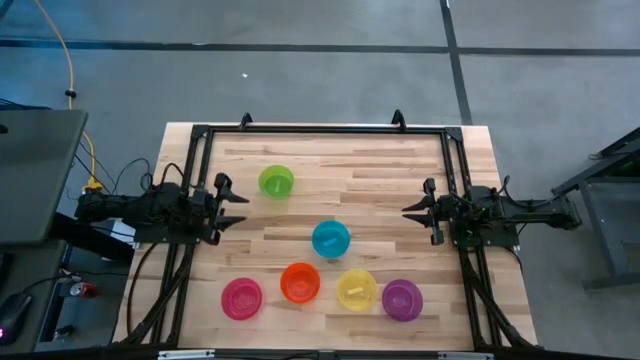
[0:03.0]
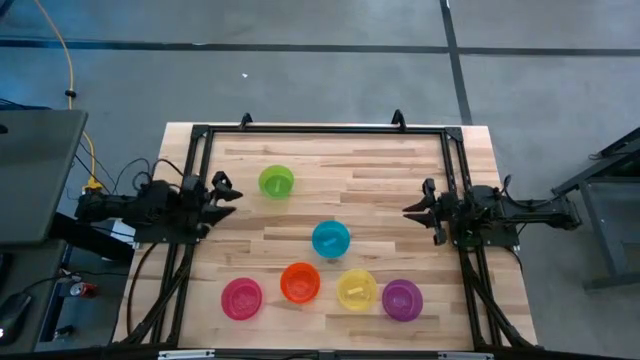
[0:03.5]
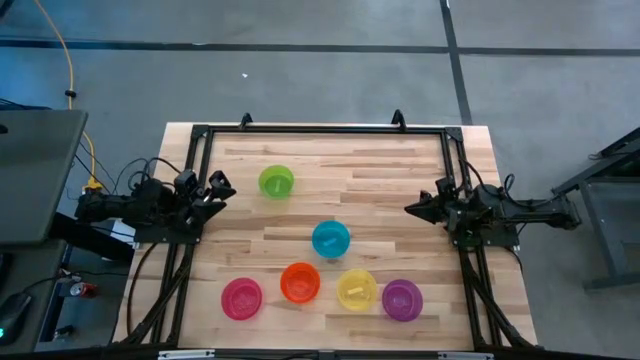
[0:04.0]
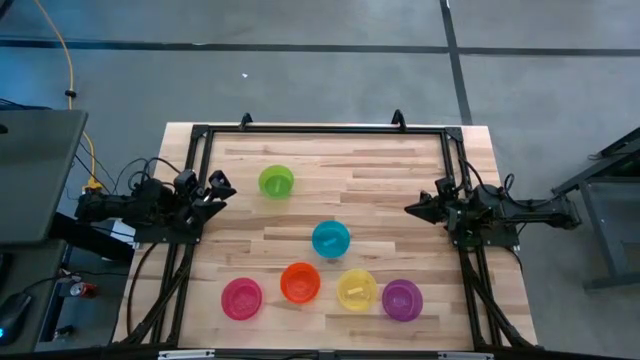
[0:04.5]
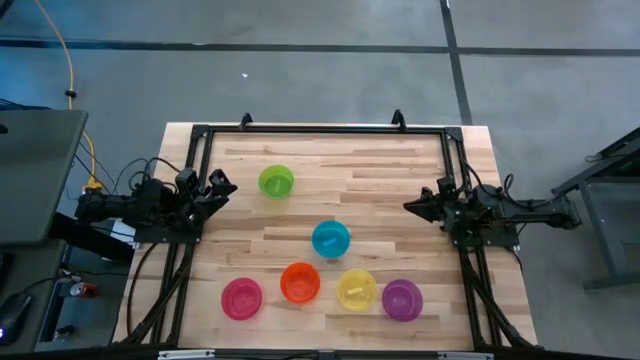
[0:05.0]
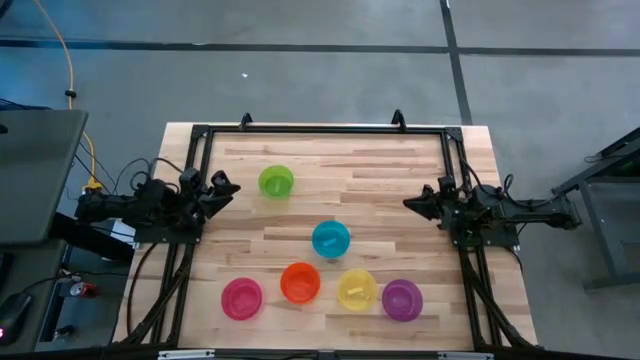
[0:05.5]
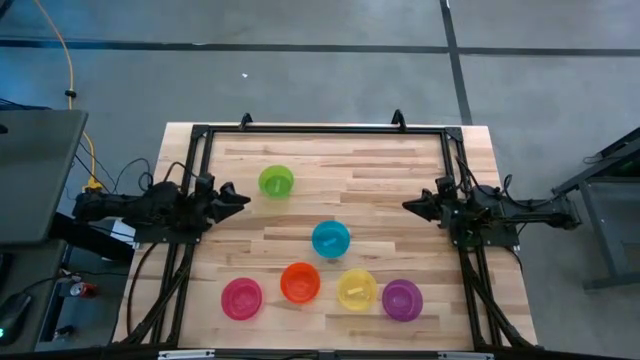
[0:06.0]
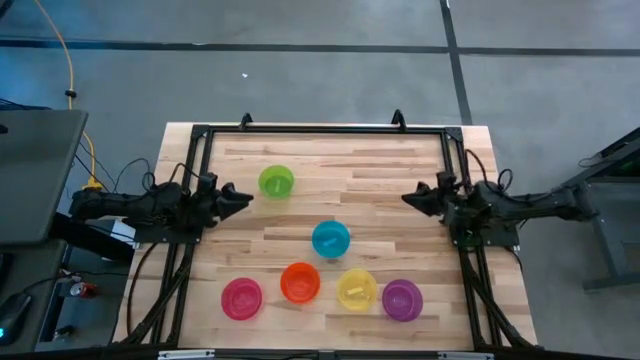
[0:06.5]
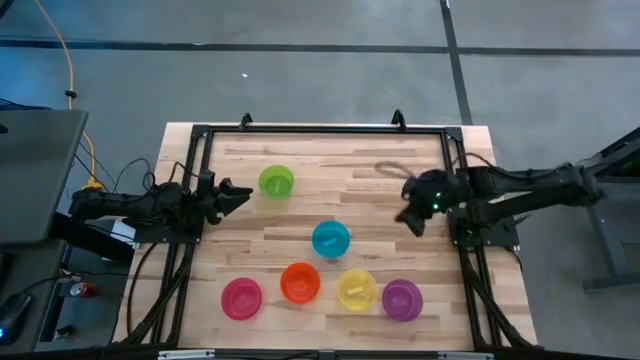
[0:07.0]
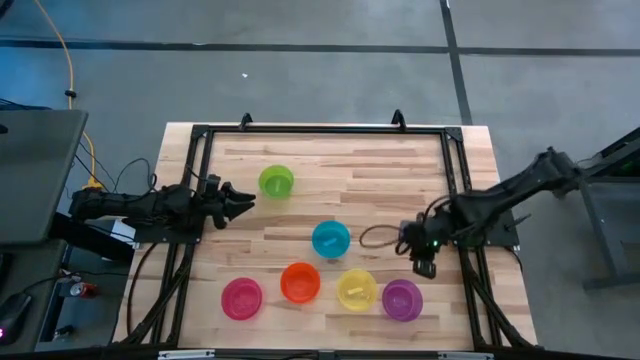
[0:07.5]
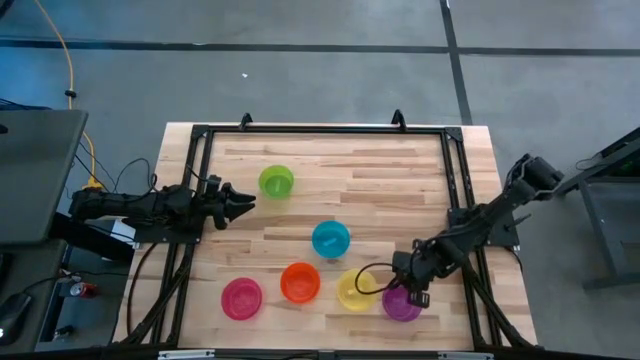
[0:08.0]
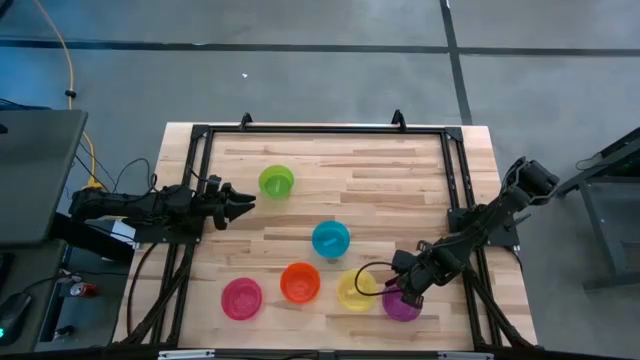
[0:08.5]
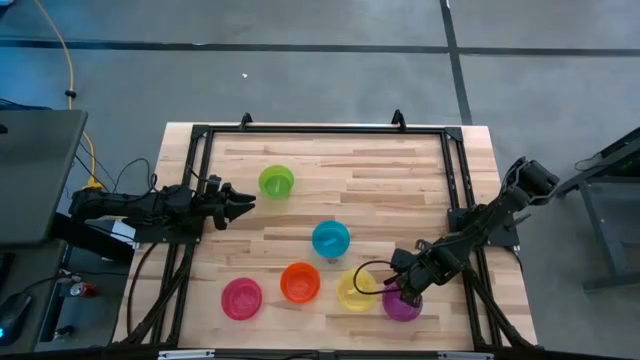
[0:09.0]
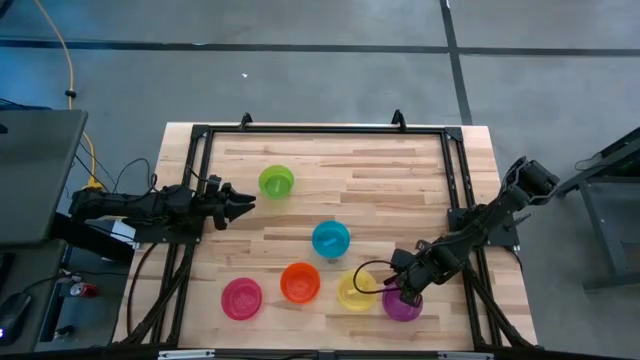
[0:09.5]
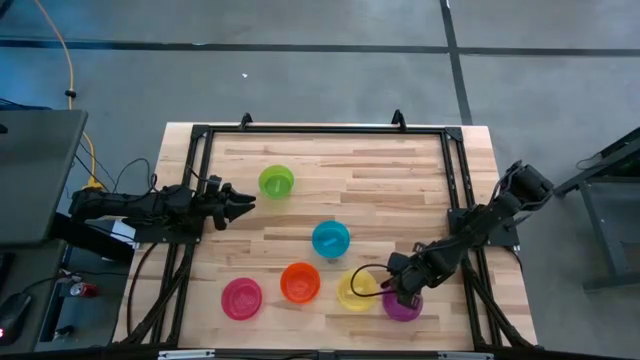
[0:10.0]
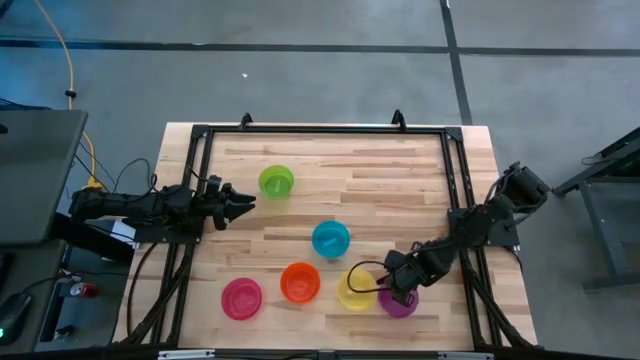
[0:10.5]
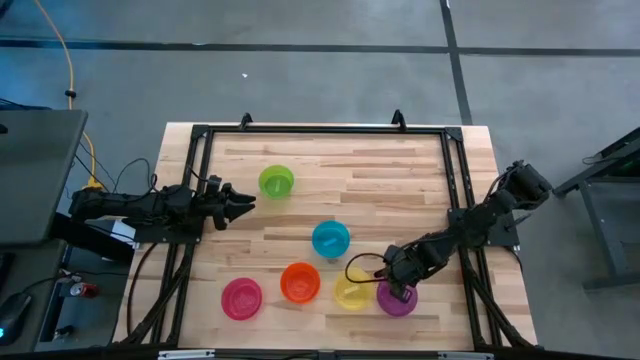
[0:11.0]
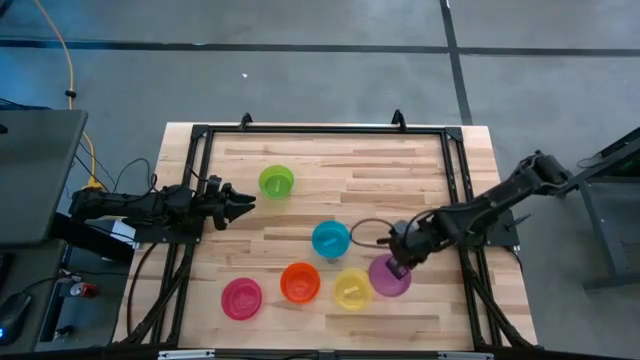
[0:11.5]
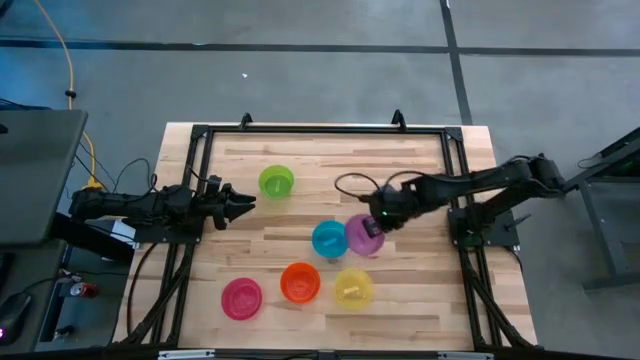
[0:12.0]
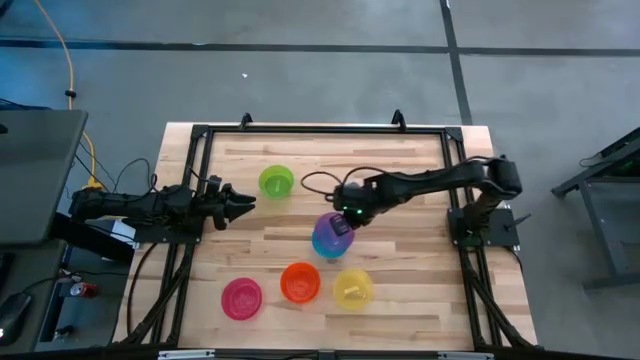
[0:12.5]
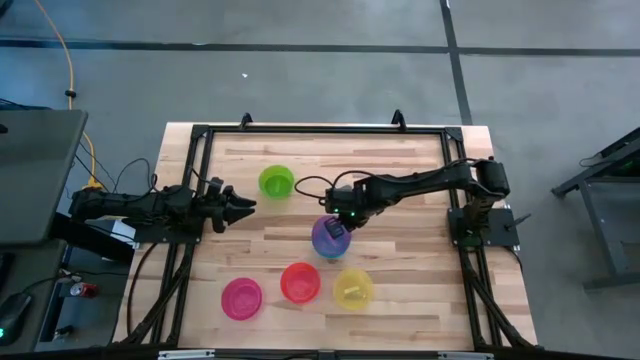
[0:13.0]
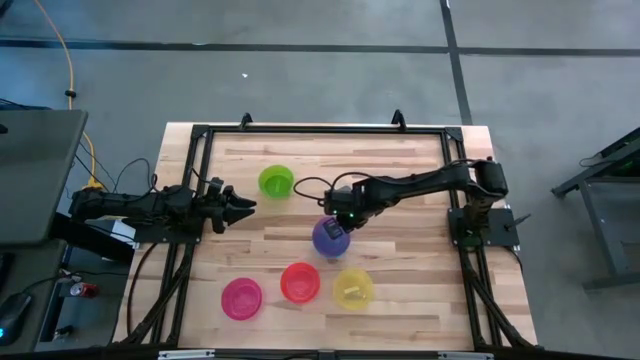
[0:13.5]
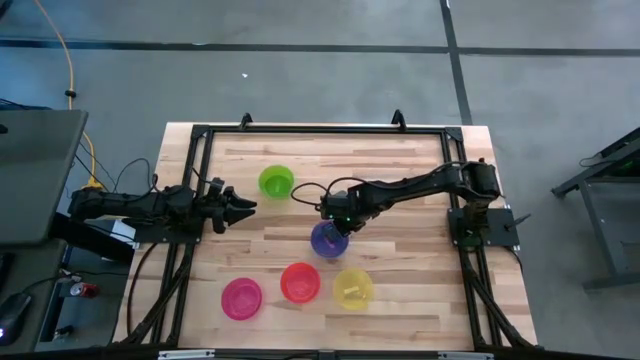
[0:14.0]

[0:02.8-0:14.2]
Task: Nest bowls inside each other
Stack the purple bowl on the blue bowl

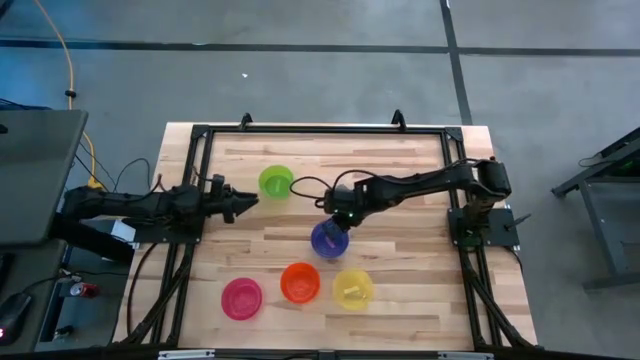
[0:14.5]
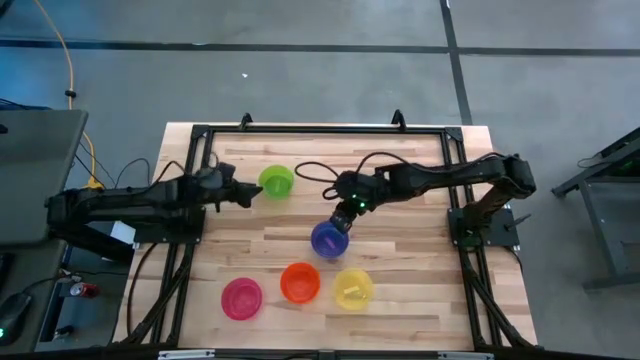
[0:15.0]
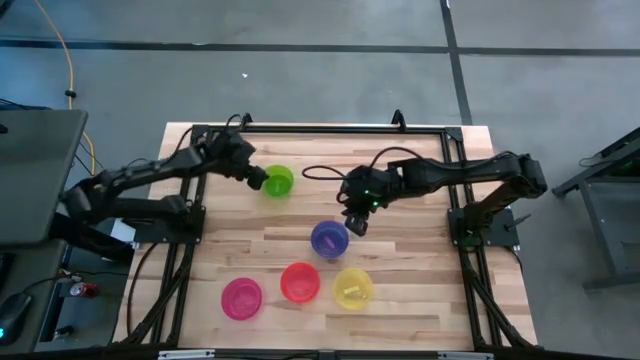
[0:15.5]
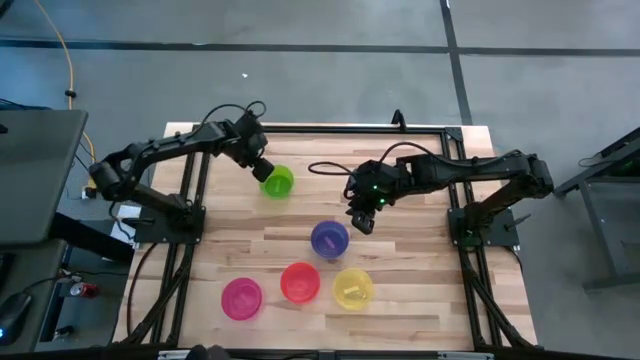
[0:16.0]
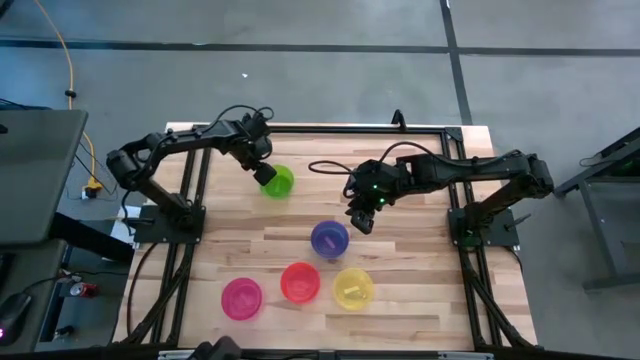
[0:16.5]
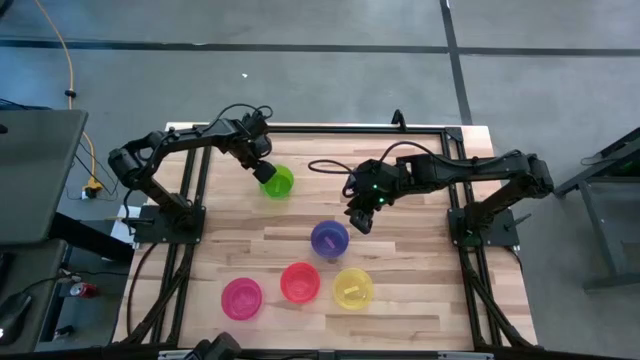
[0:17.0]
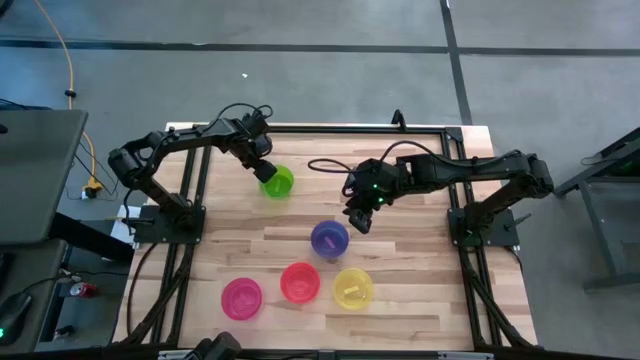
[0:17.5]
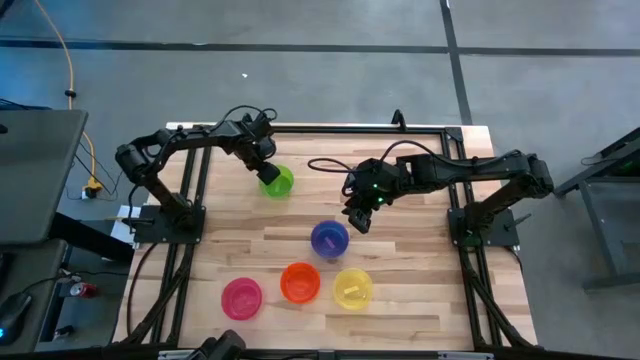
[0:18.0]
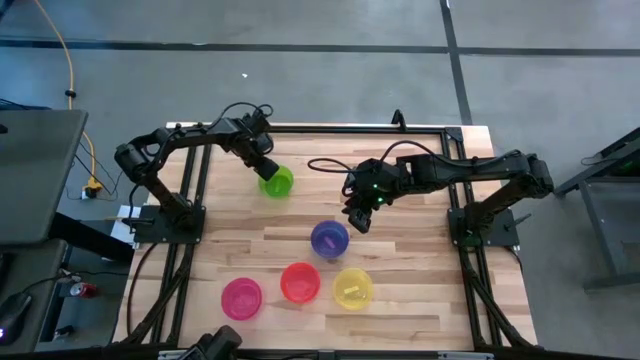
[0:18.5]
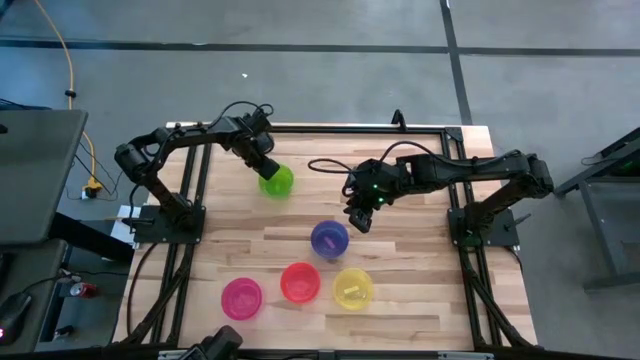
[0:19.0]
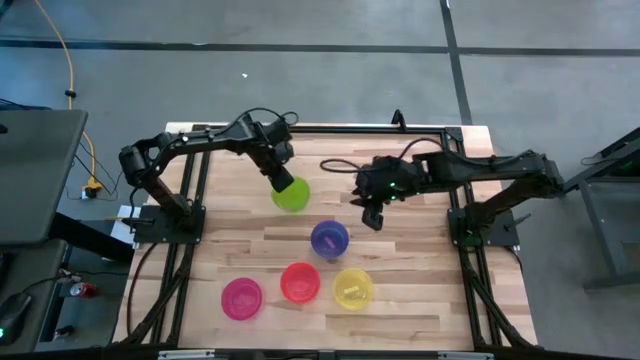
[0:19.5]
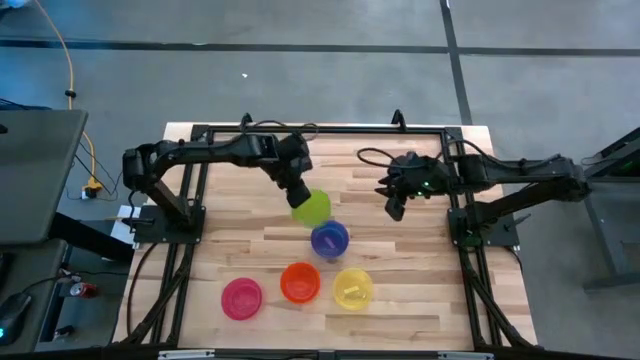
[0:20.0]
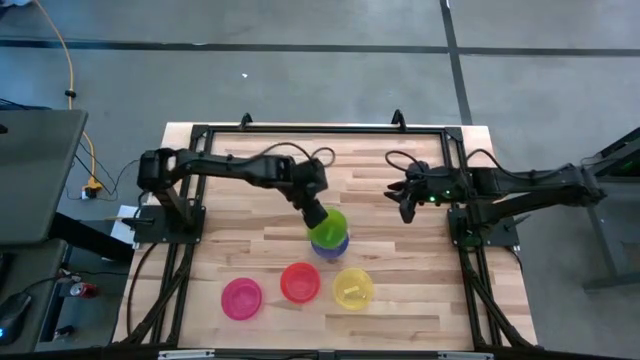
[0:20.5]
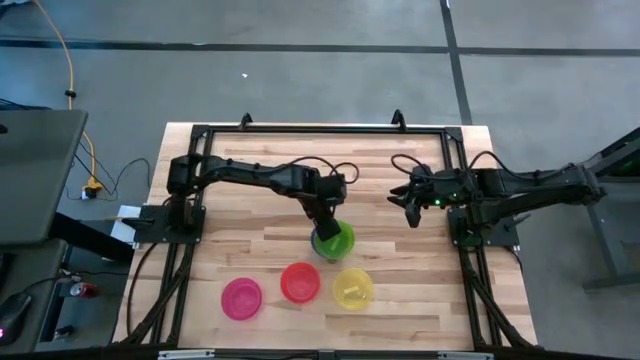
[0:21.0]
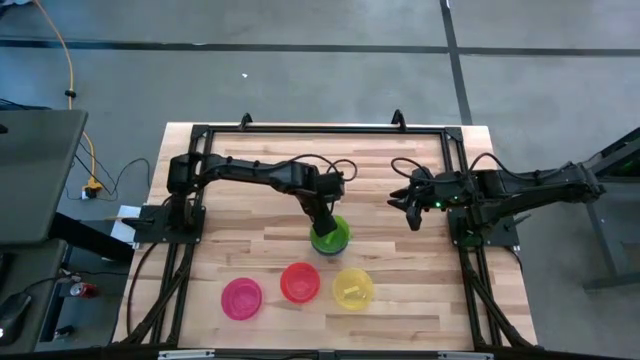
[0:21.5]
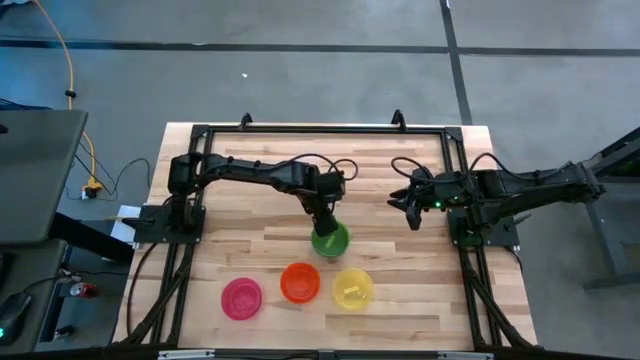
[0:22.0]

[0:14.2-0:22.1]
Stack the green bowl on the purple bowl

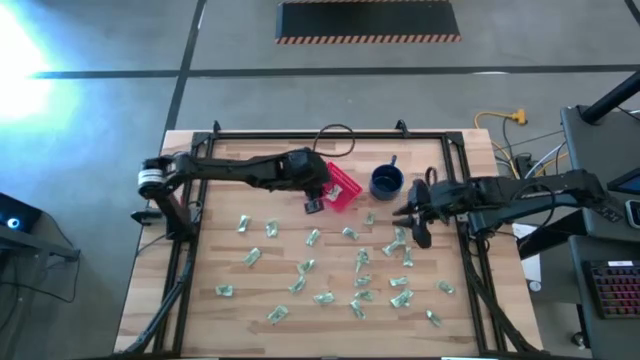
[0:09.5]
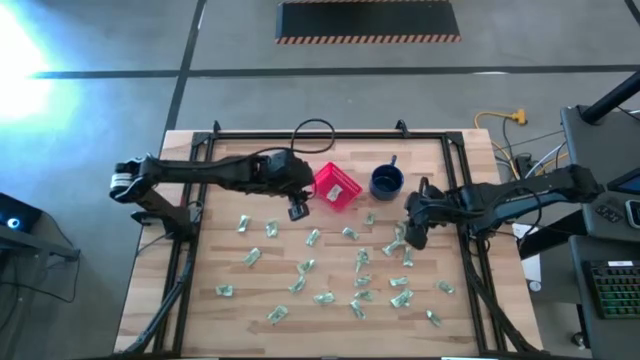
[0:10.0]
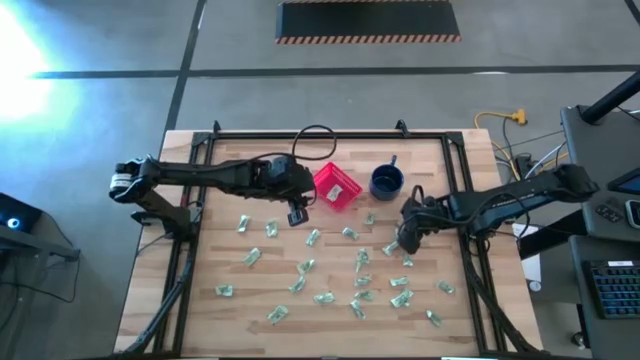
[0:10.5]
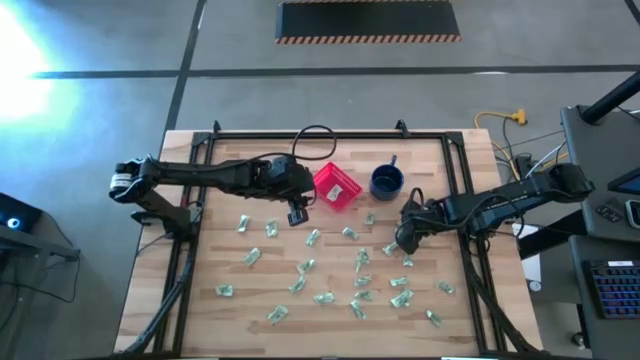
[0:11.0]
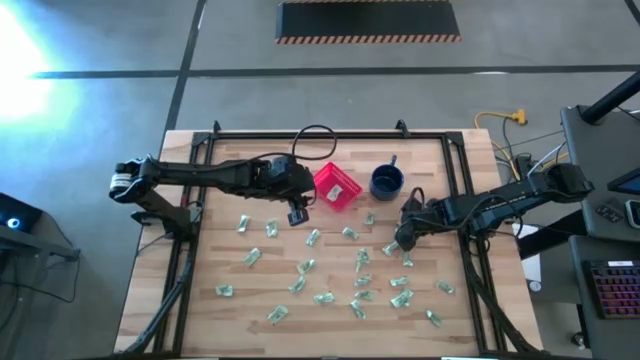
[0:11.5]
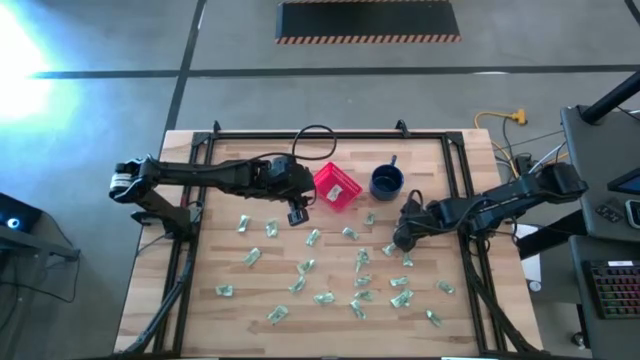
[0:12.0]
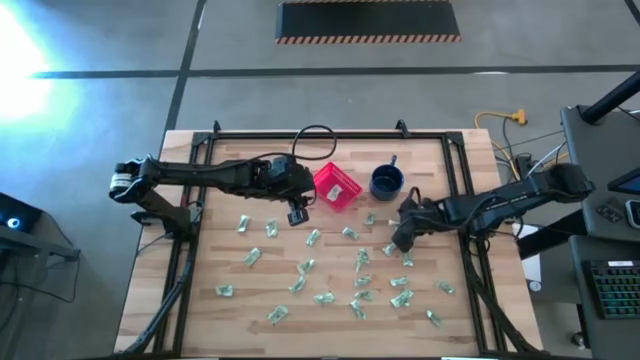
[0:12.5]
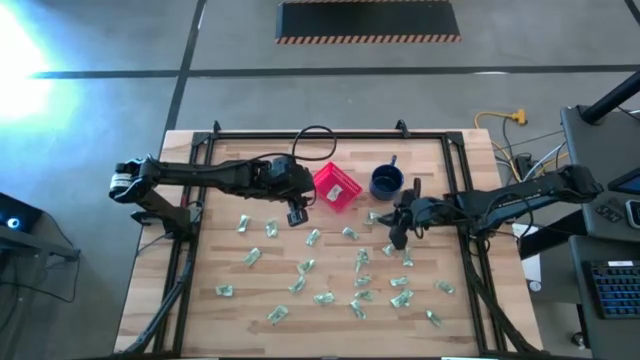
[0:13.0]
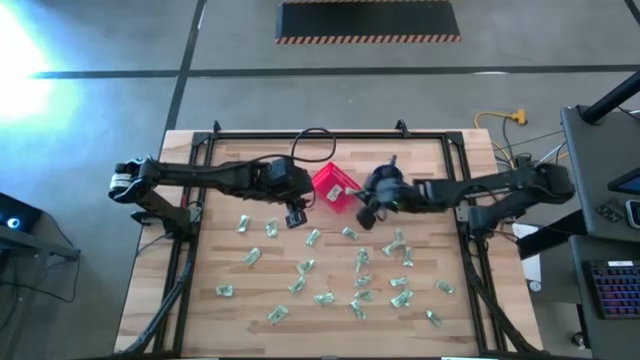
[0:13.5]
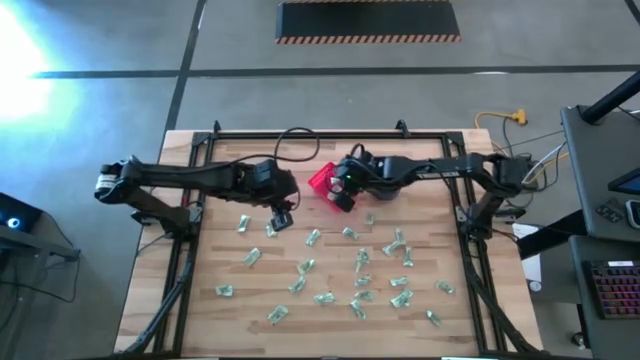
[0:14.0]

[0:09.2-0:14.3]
Task: Pick and place Stevia / Truvia into bins
Put the stevia packet into the red basket
